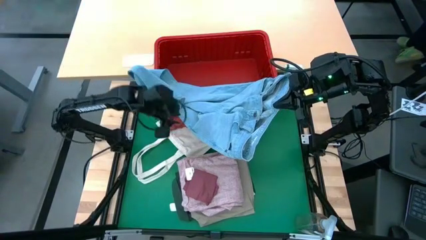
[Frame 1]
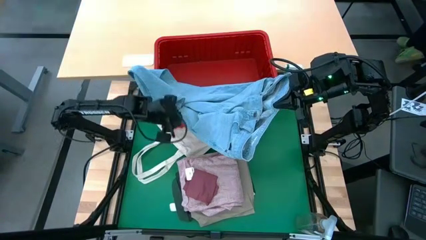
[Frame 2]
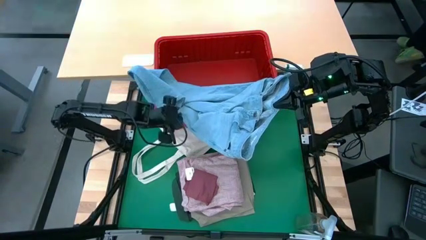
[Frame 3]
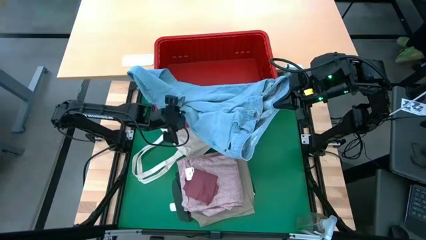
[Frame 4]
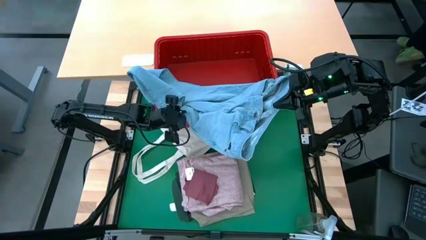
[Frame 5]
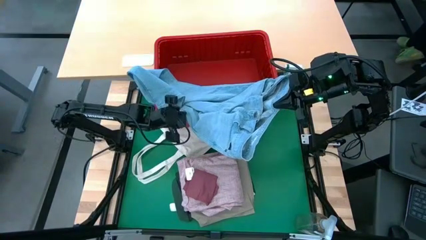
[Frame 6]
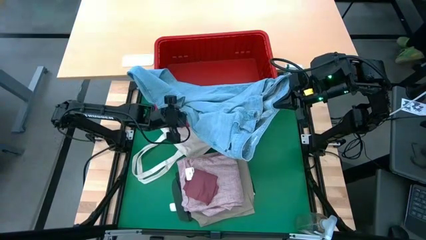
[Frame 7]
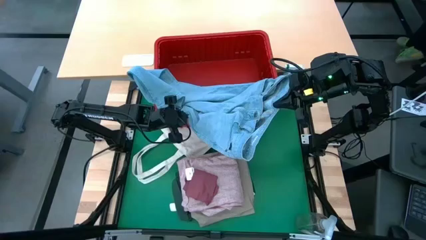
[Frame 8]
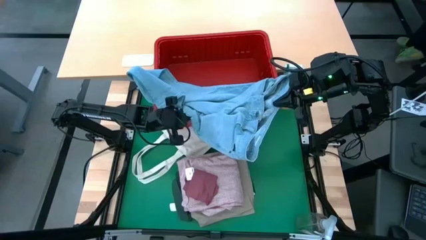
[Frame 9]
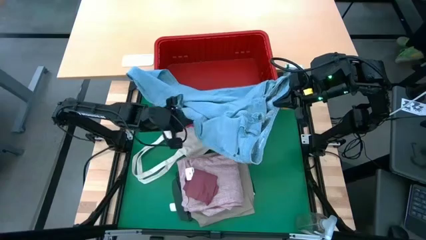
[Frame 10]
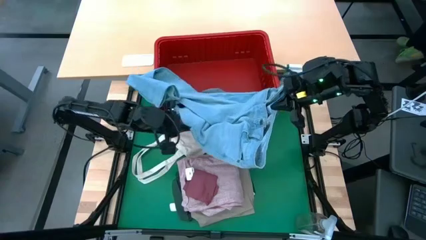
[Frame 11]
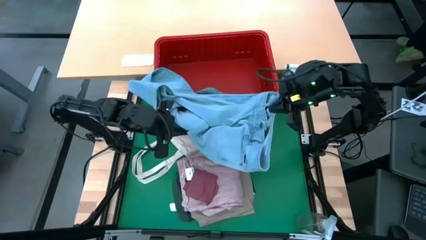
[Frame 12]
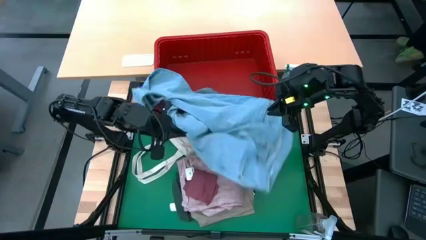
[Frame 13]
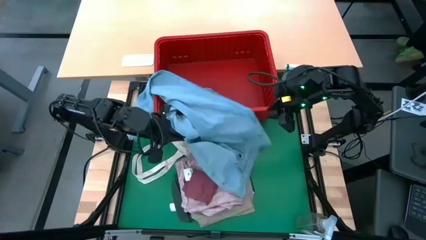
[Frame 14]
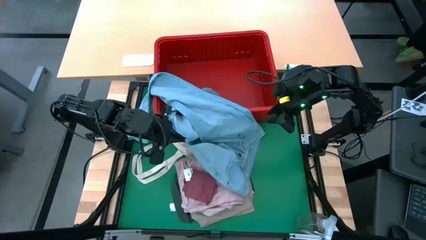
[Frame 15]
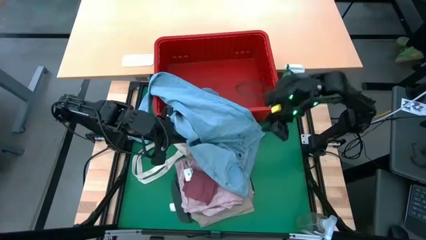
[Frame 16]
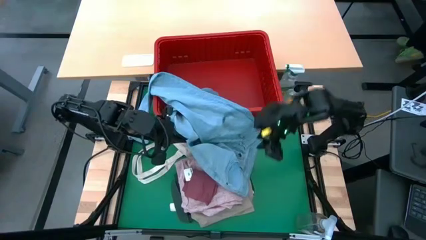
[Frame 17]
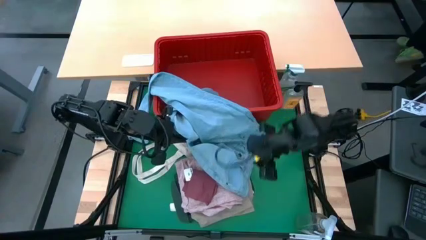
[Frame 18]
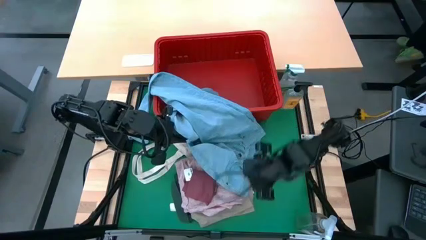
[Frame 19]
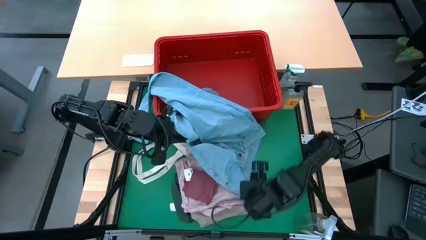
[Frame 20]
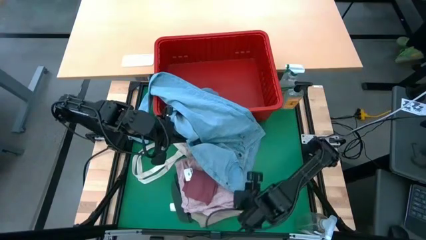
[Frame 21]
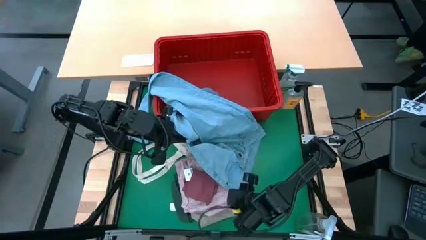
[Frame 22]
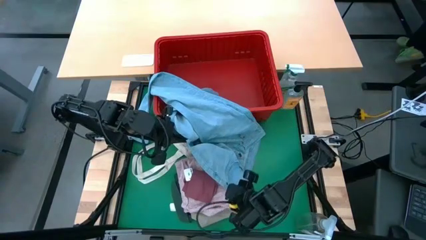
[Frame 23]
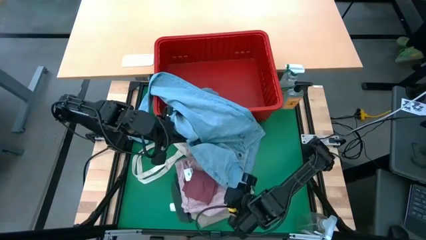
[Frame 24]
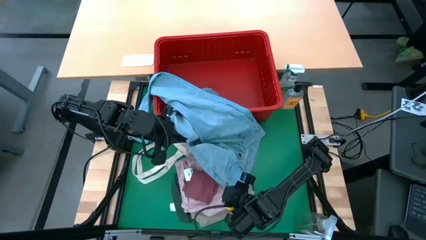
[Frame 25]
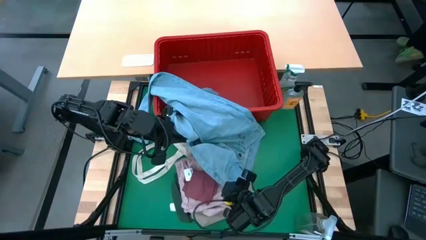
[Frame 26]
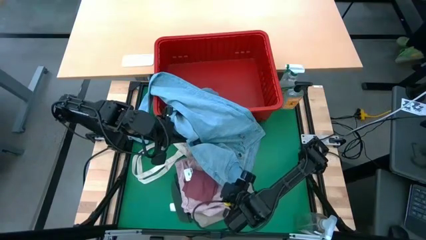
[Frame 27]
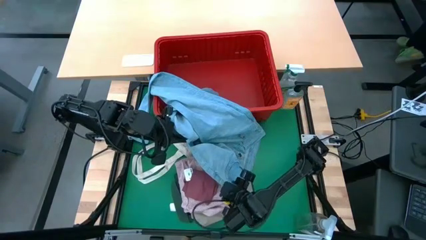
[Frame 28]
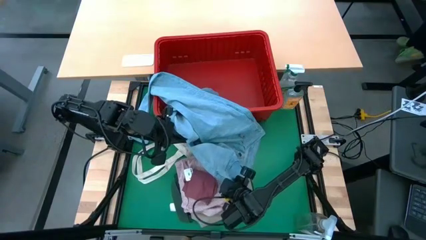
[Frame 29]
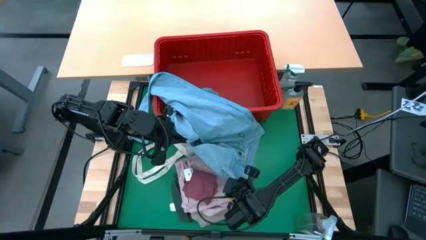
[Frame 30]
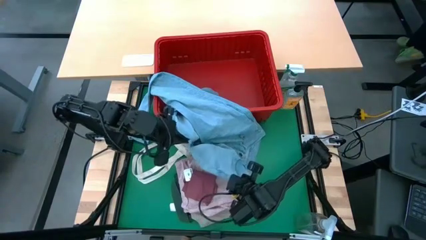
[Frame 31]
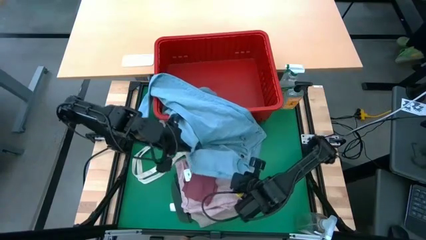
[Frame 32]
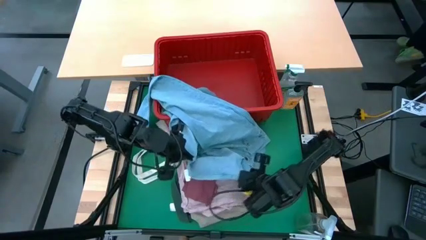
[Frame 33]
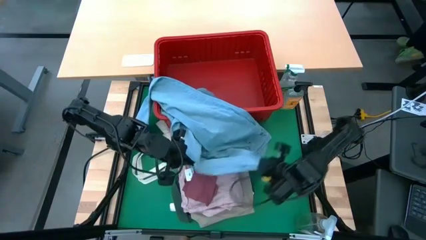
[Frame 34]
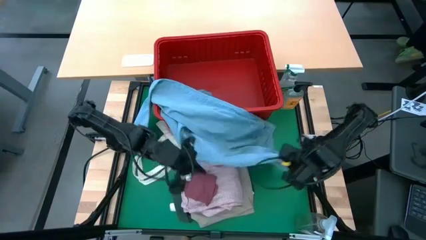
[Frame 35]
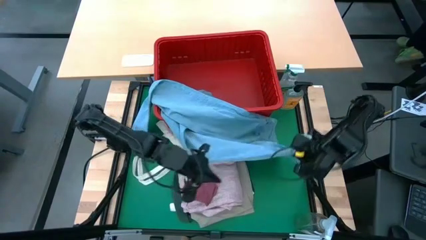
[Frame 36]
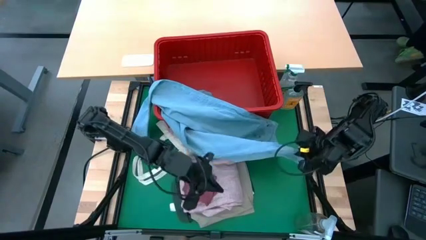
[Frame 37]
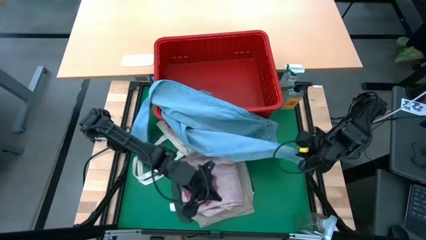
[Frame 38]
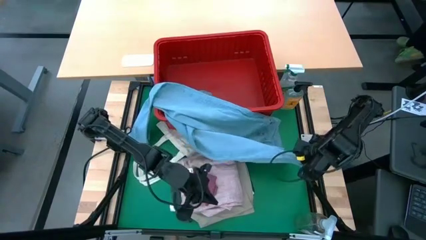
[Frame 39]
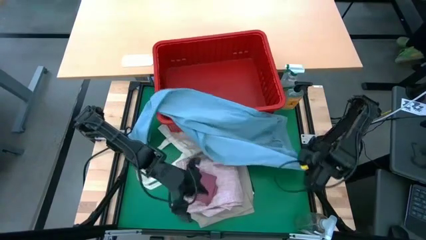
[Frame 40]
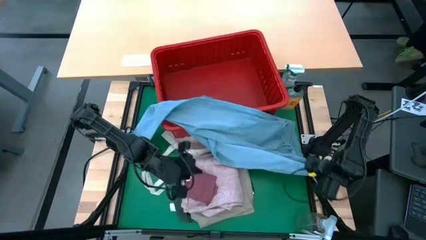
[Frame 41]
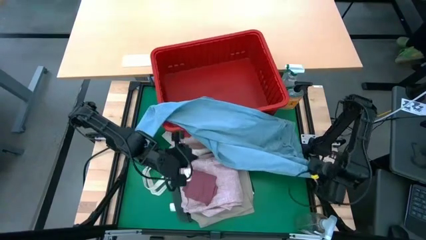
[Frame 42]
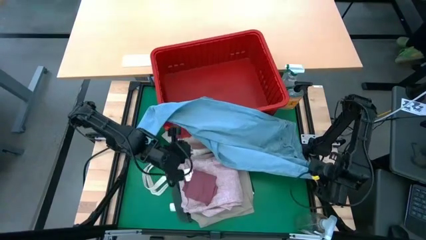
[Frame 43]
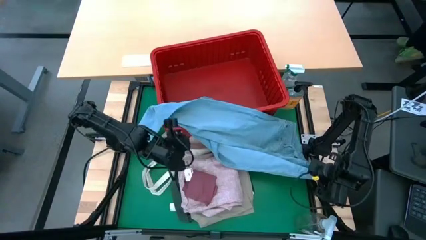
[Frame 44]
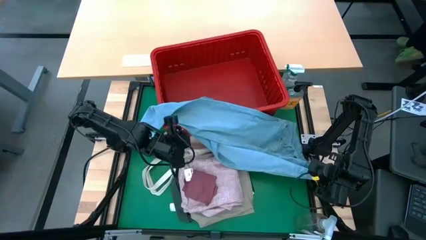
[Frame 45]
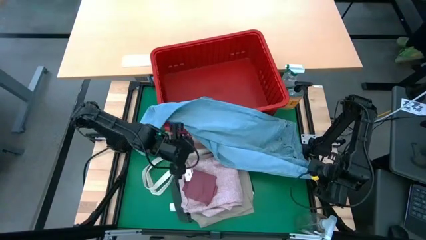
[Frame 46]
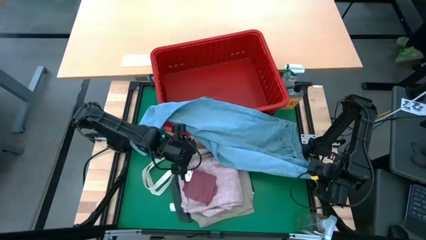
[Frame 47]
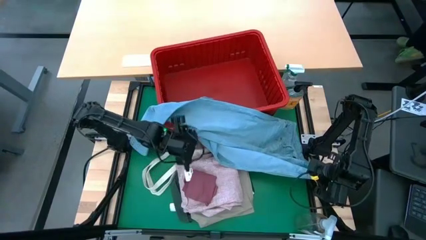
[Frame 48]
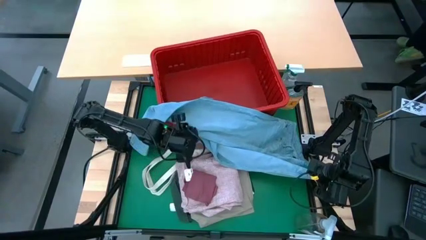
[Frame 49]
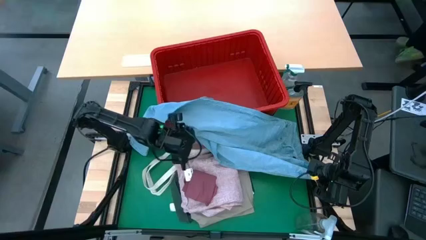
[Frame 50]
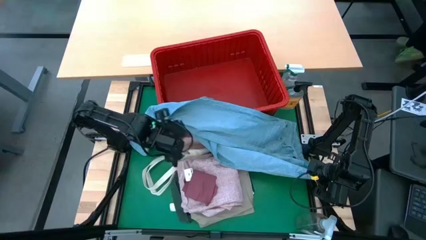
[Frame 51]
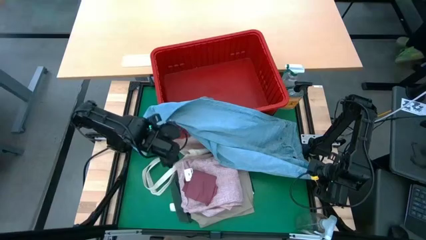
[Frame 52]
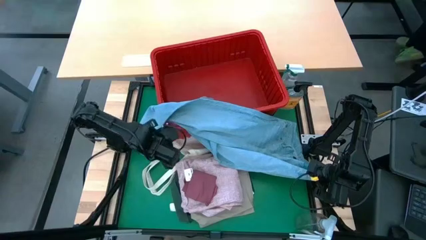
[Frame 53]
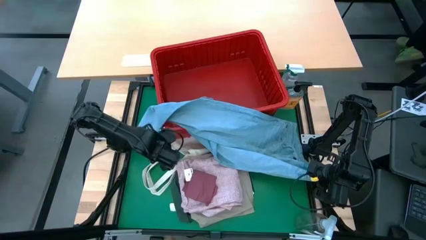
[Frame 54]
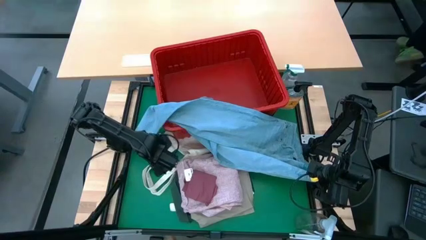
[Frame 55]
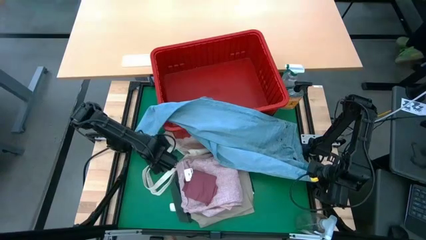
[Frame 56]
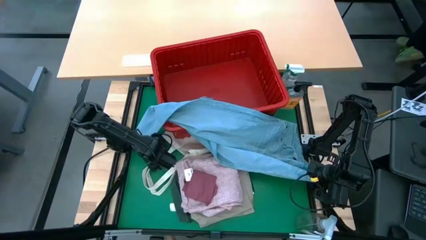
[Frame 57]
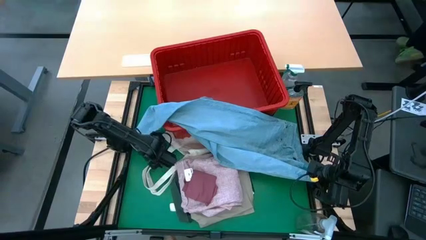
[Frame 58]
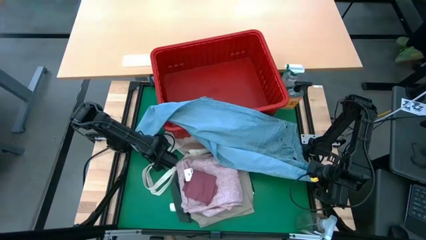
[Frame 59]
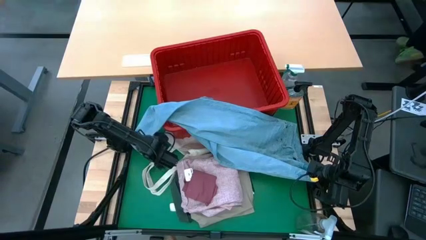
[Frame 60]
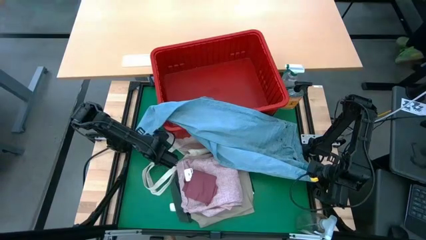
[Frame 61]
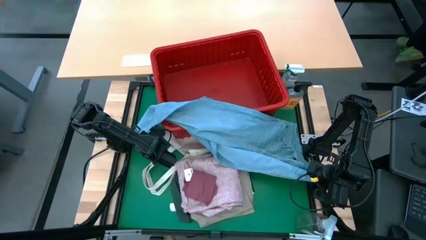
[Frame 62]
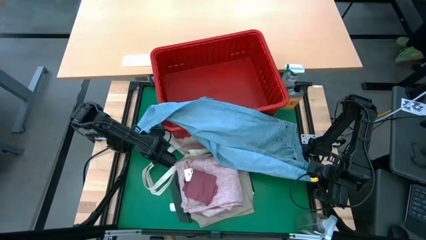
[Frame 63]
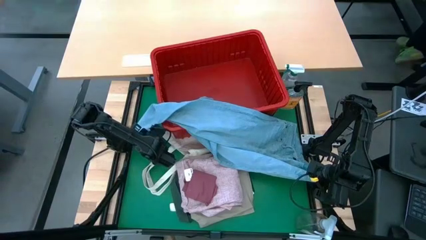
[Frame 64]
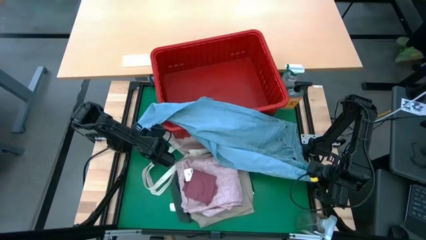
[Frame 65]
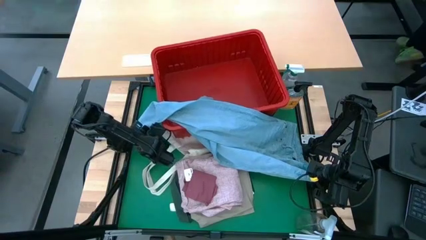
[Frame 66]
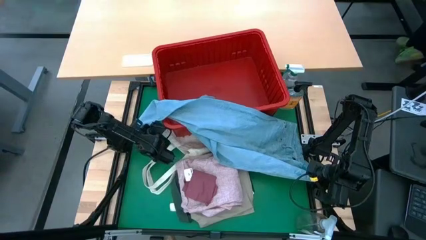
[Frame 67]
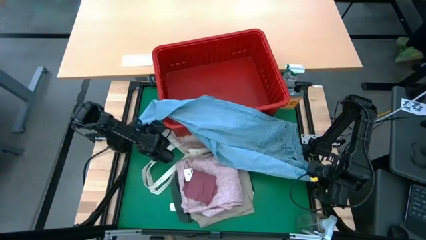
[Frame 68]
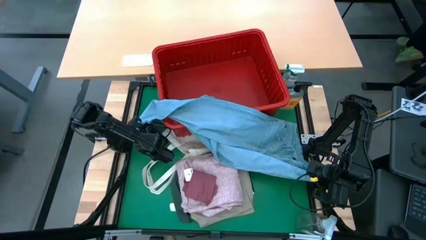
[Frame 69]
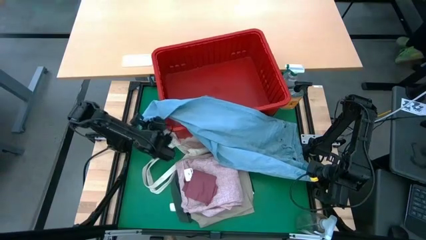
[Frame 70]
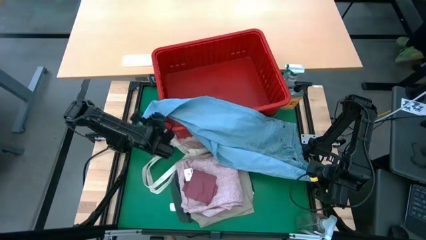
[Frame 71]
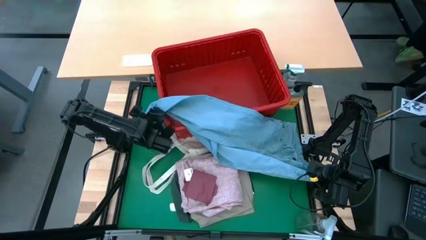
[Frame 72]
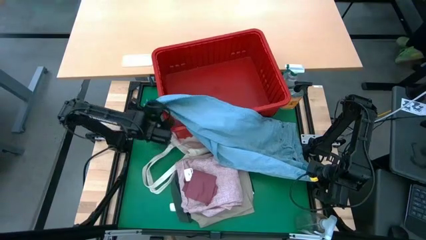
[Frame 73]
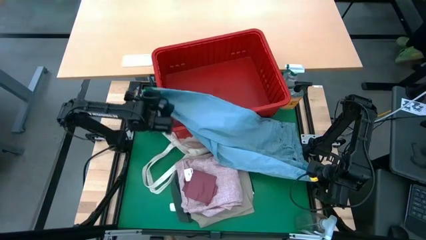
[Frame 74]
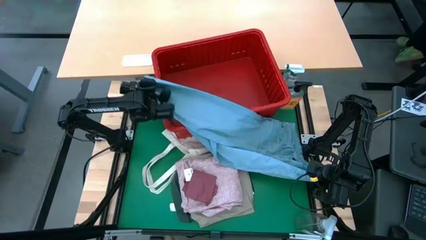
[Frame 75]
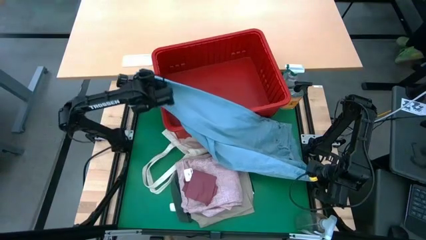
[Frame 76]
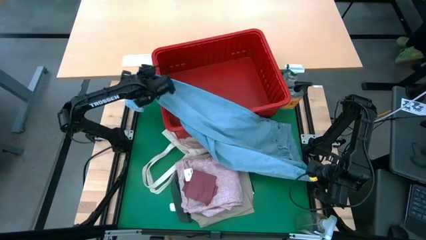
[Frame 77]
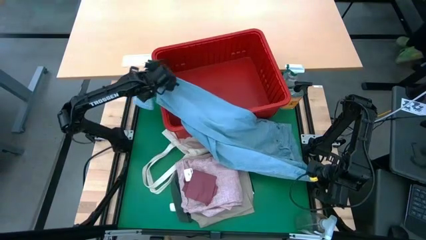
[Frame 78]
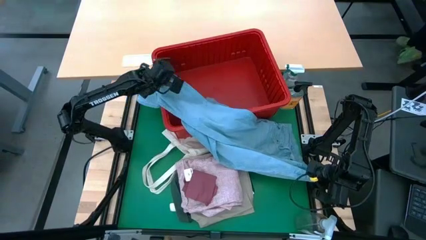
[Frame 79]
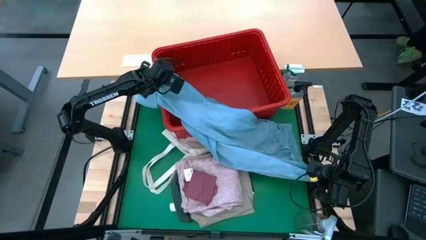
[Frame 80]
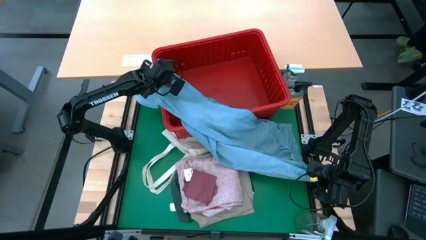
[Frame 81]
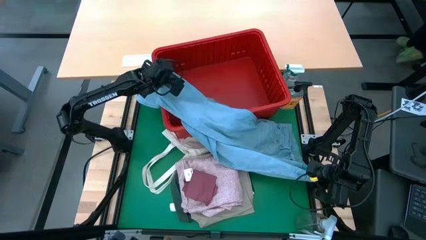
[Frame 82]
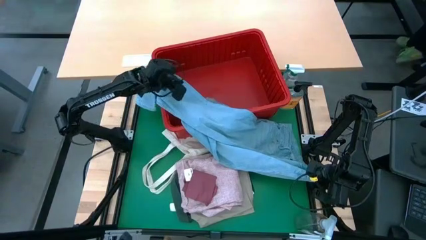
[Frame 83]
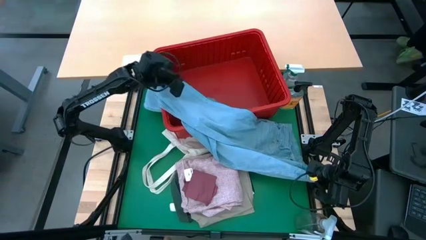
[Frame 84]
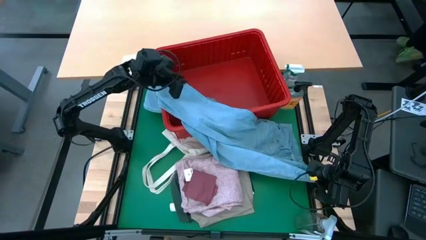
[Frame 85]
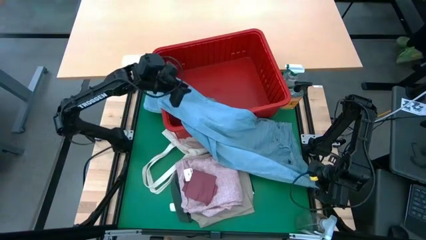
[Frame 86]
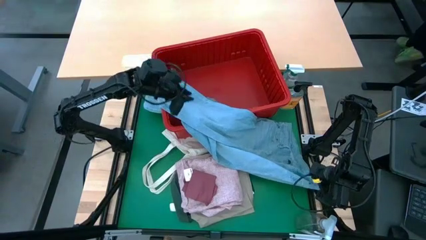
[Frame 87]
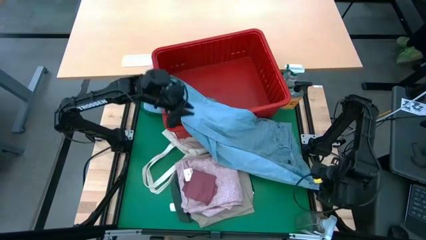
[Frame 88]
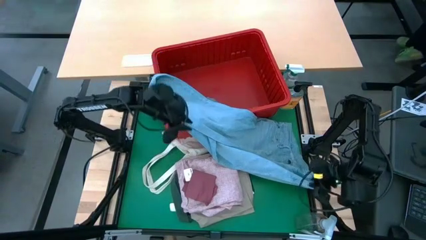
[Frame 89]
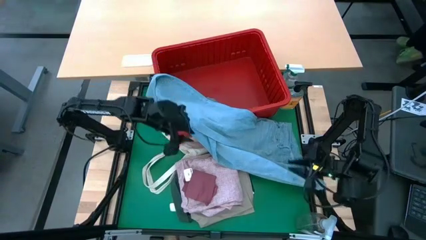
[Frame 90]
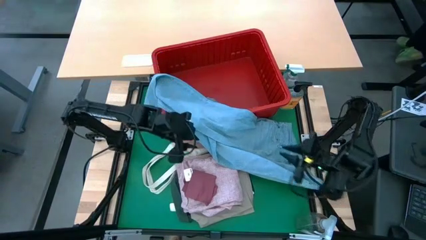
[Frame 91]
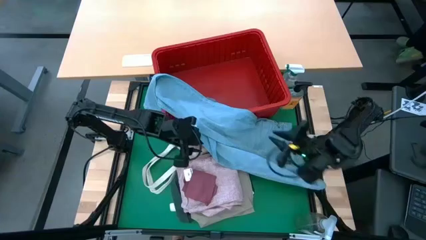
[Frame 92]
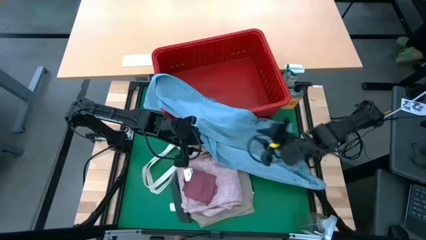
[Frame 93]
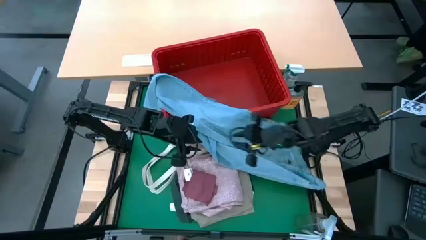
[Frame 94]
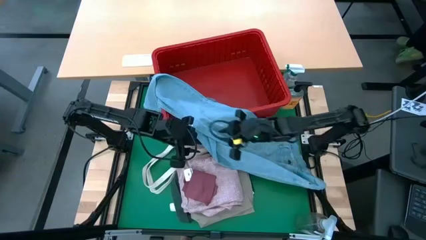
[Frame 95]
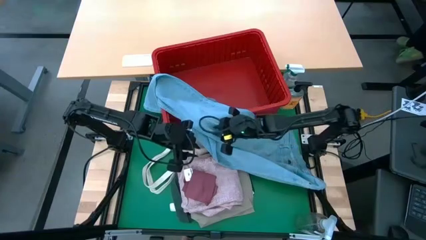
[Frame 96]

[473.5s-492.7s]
Task: Fold laundry
Fold the blue jeans
